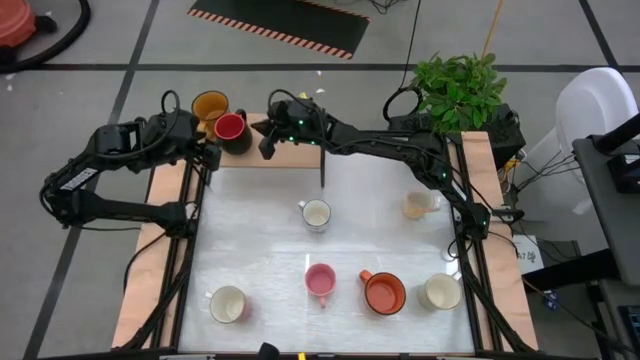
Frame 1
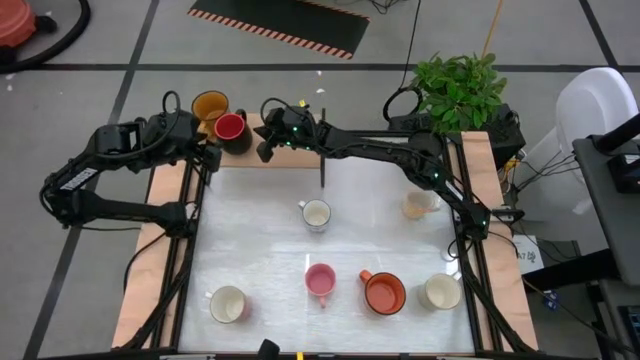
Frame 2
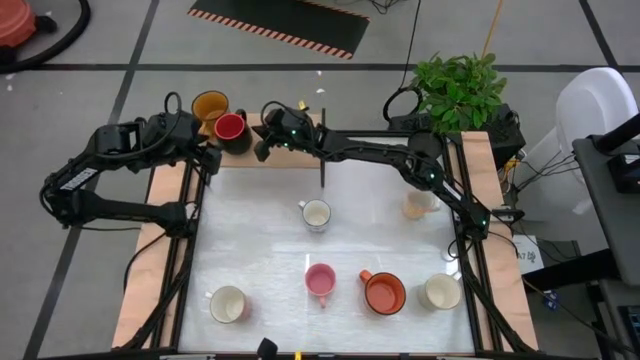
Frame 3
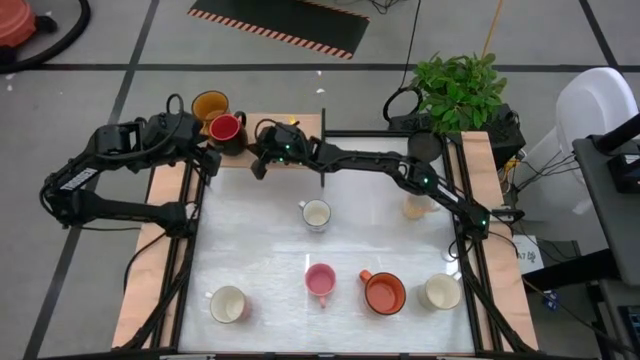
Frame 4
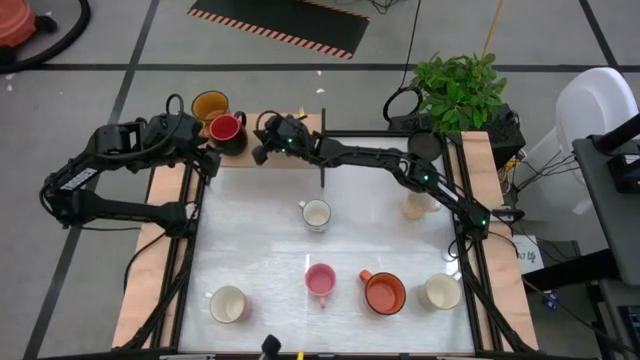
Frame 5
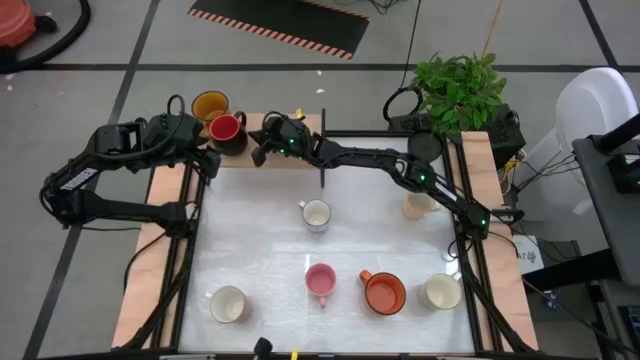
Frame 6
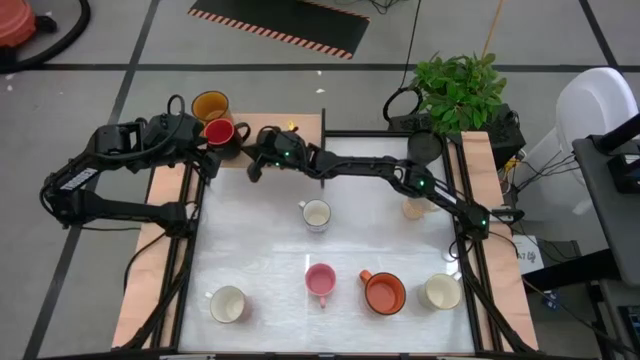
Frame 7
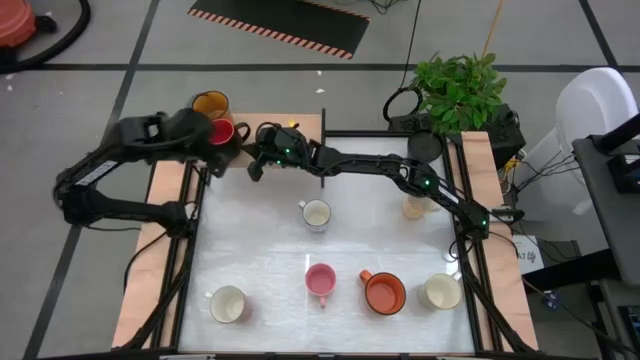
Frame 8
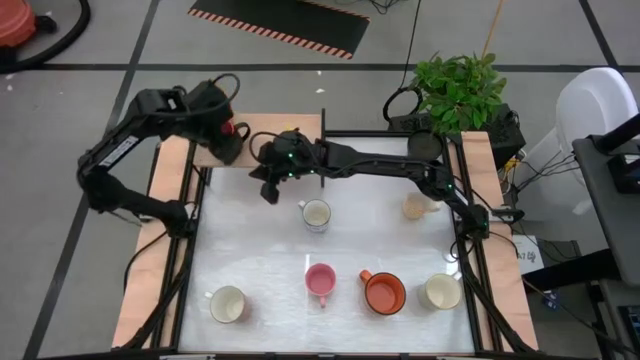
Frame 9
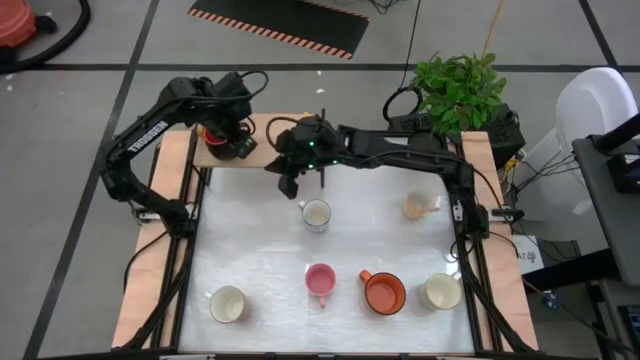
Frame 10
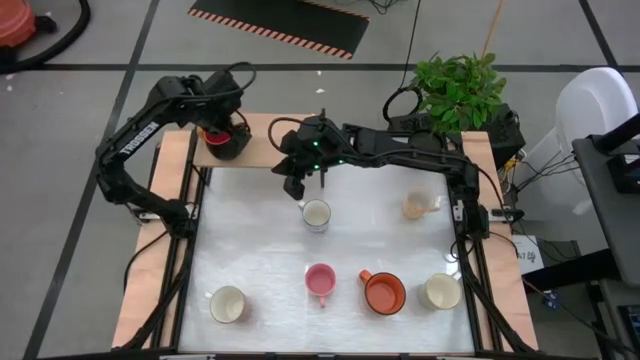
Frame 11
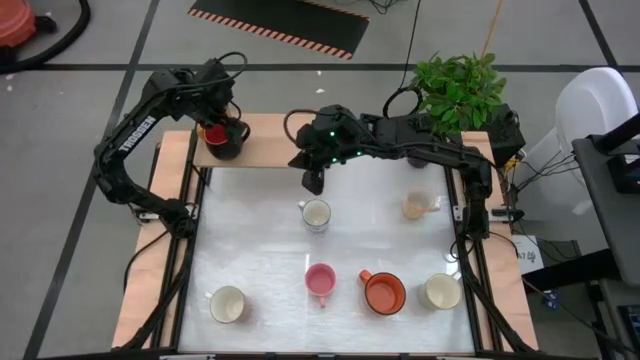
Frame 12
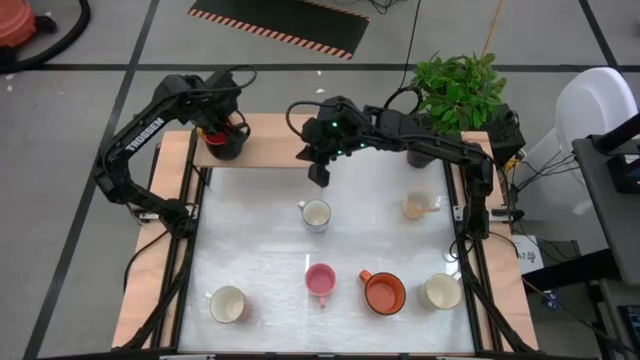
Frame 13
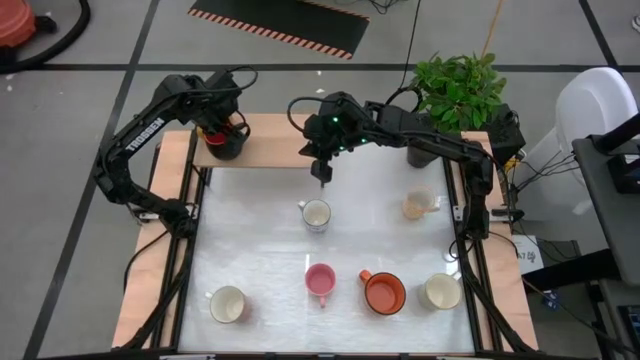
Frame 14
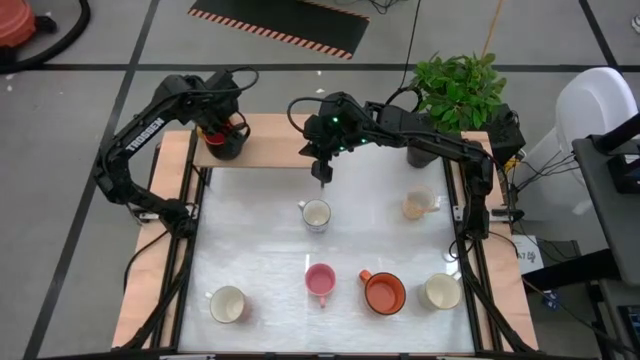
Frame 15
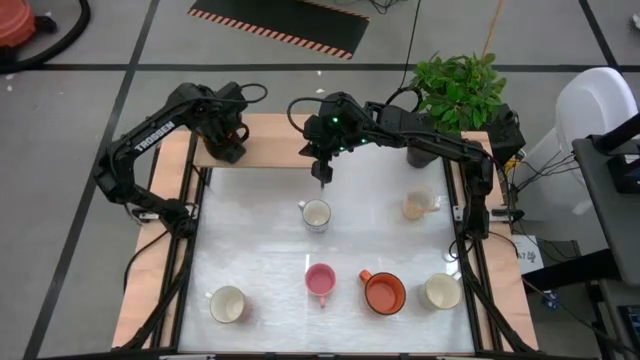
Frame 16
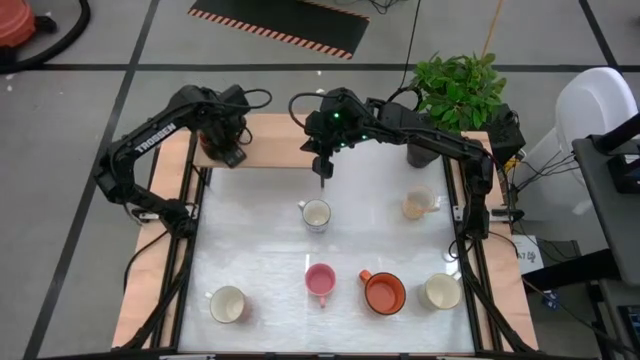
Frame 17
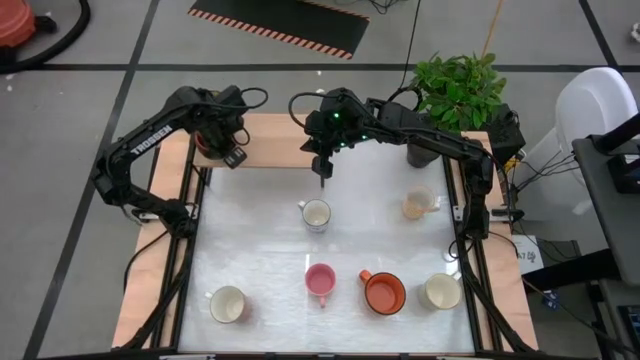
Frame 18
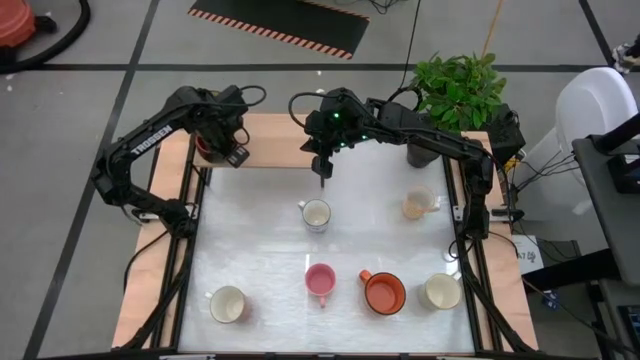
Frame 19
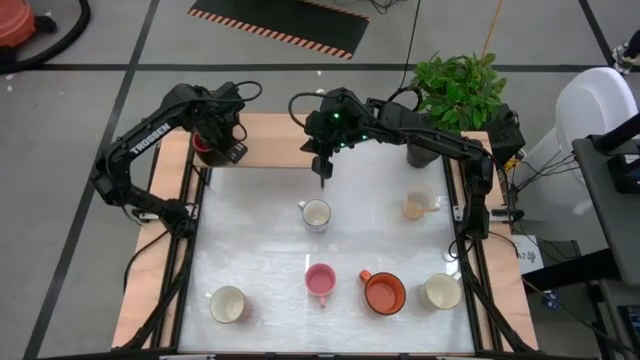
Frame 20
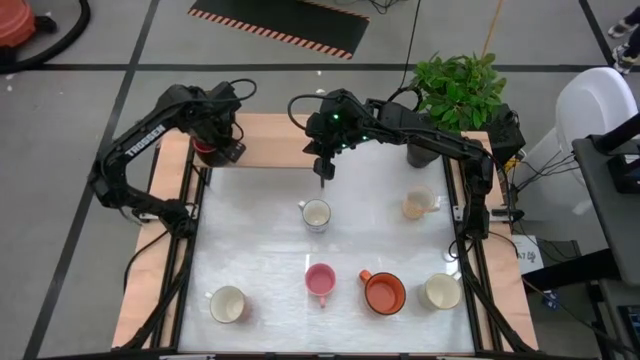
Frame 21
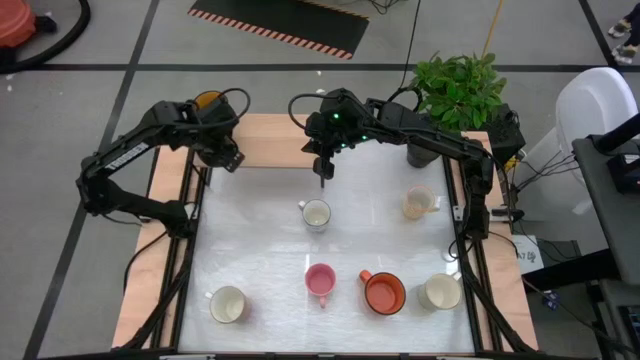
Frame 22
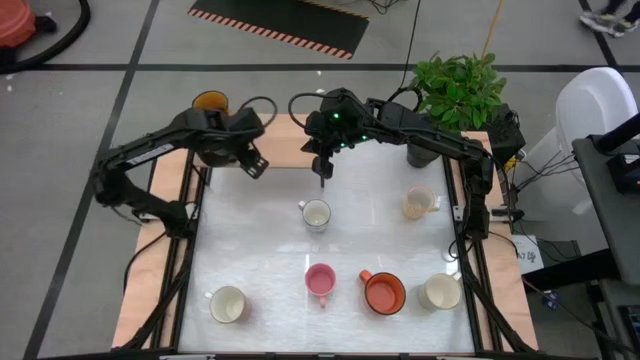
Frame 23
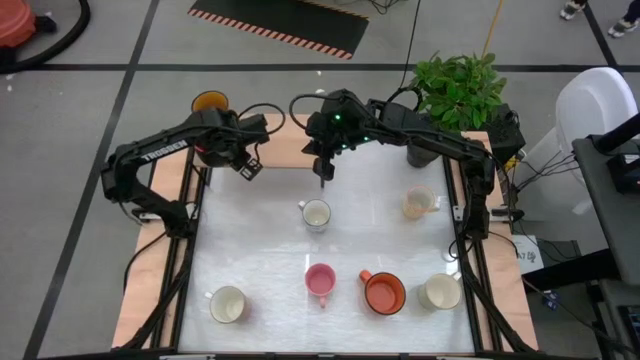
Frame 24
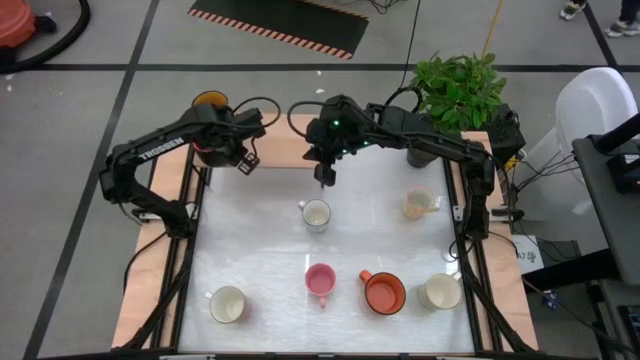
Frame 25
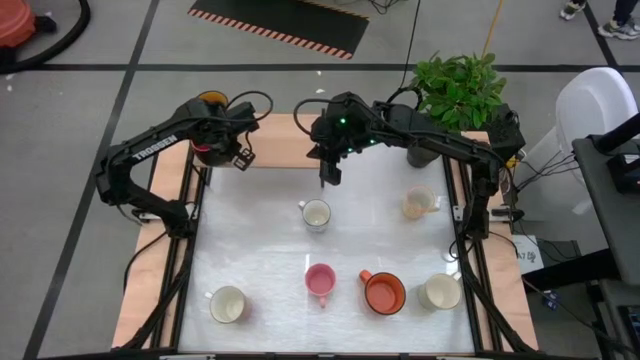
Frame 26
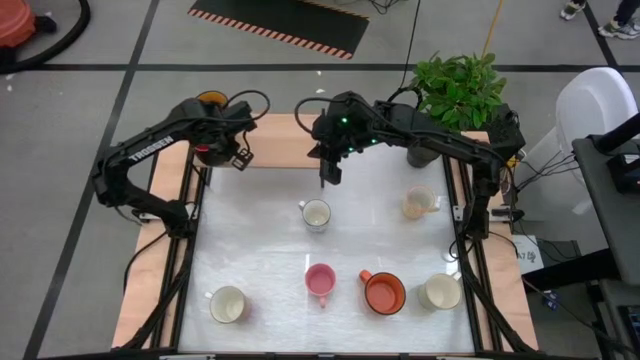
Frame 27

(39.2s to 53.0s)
Task: Place coffee mugs
Put the black mug on the shelf
